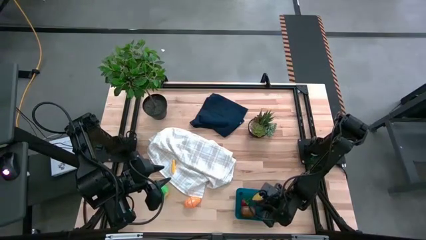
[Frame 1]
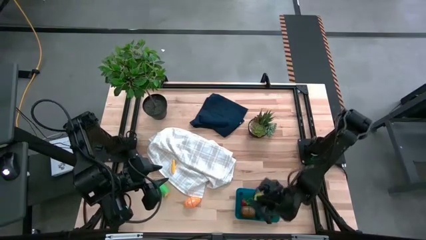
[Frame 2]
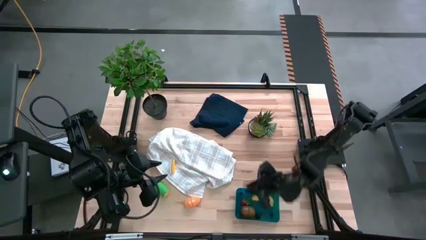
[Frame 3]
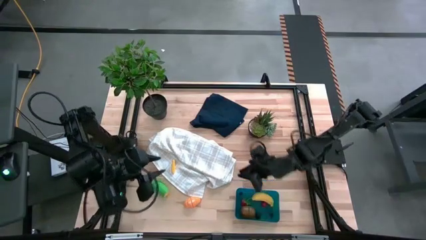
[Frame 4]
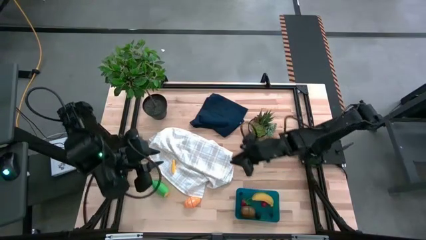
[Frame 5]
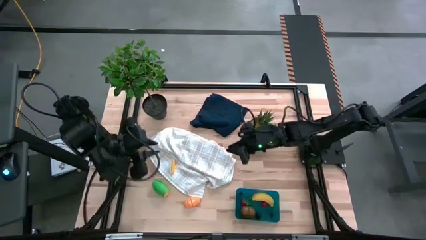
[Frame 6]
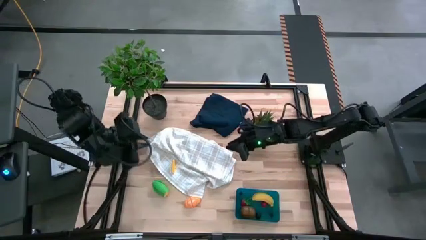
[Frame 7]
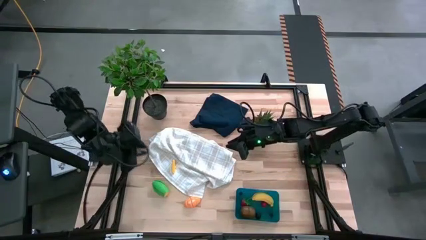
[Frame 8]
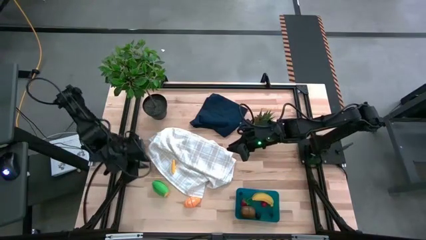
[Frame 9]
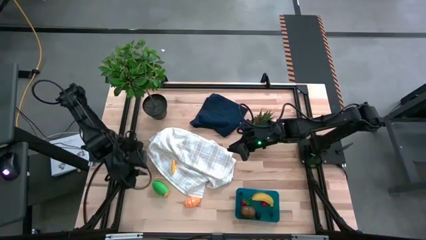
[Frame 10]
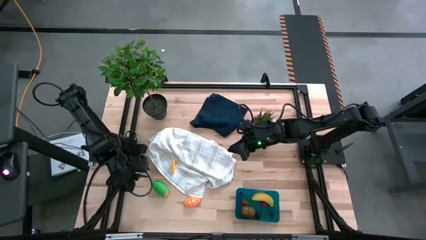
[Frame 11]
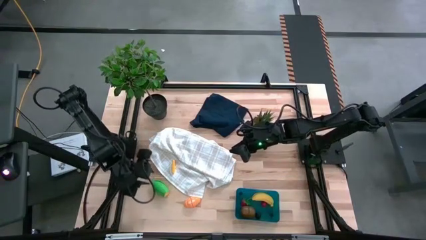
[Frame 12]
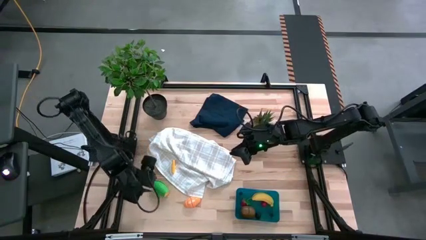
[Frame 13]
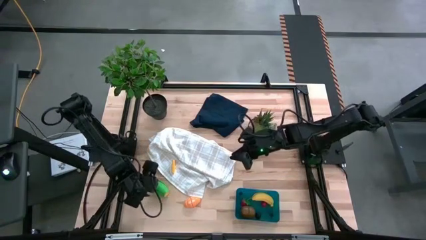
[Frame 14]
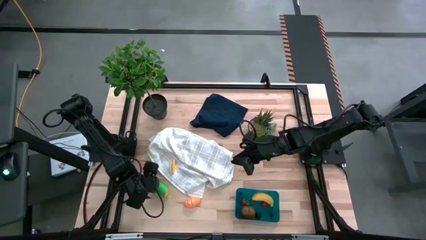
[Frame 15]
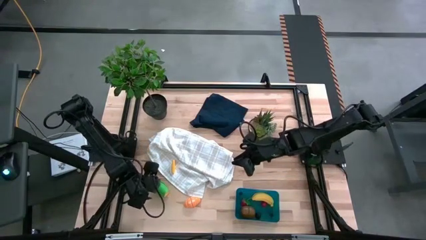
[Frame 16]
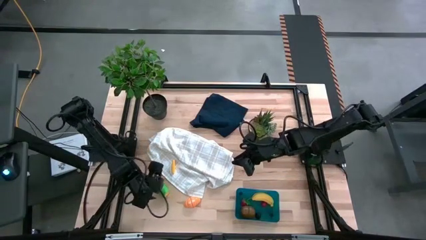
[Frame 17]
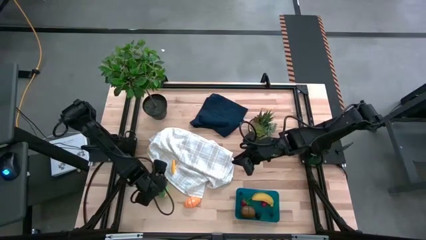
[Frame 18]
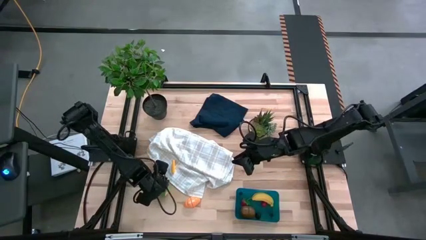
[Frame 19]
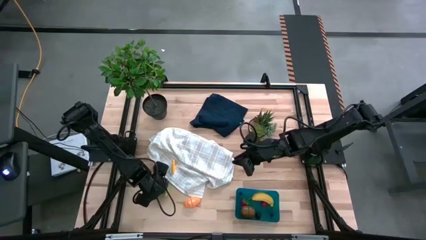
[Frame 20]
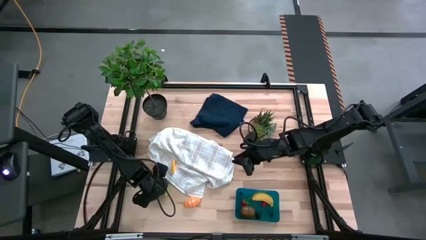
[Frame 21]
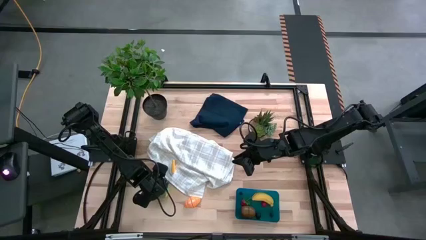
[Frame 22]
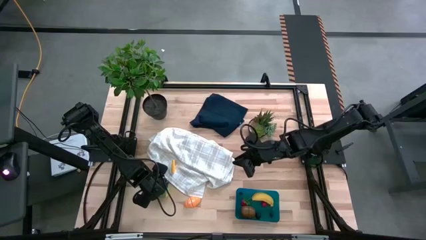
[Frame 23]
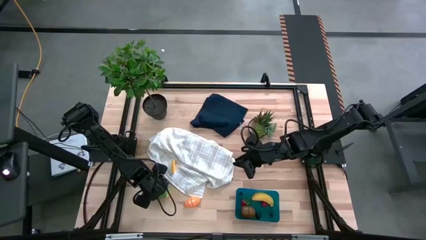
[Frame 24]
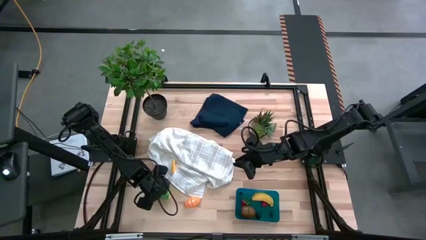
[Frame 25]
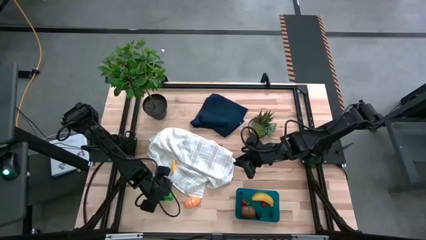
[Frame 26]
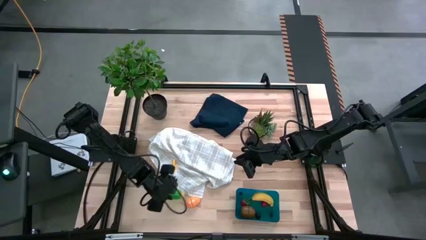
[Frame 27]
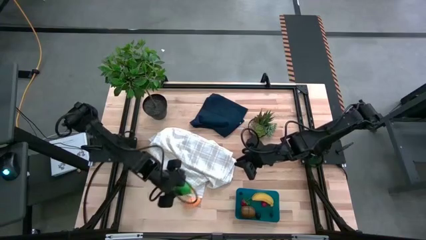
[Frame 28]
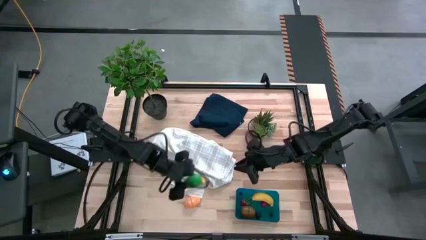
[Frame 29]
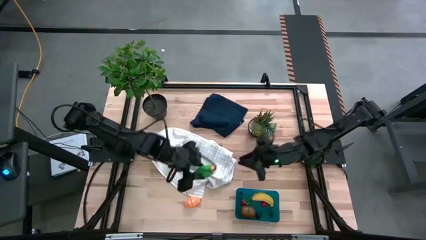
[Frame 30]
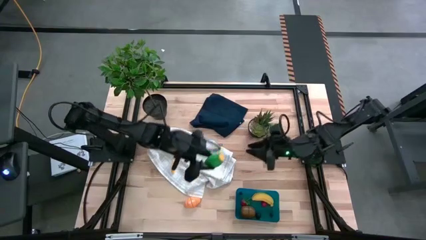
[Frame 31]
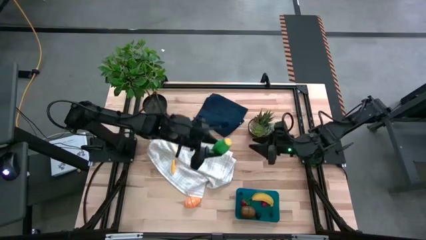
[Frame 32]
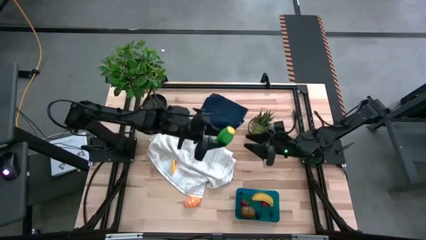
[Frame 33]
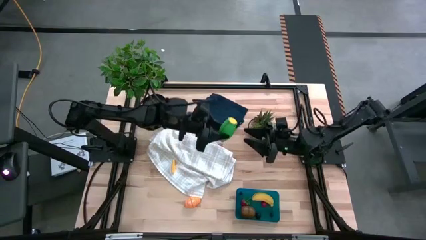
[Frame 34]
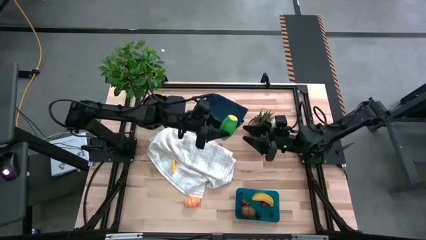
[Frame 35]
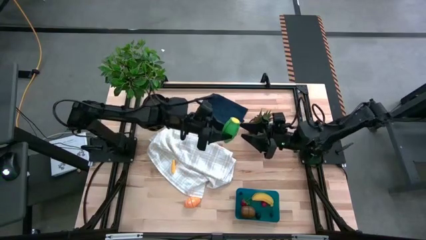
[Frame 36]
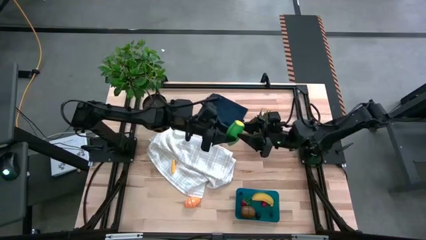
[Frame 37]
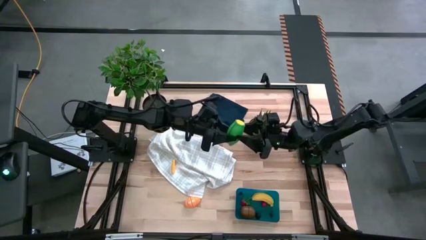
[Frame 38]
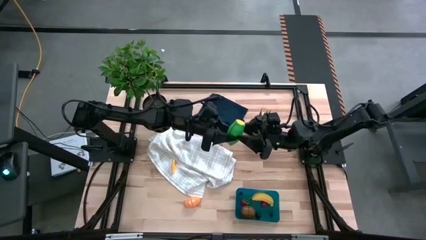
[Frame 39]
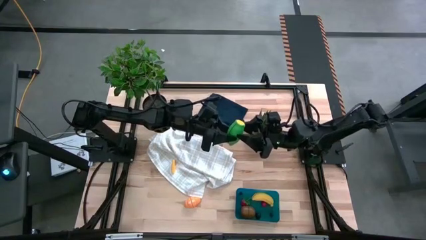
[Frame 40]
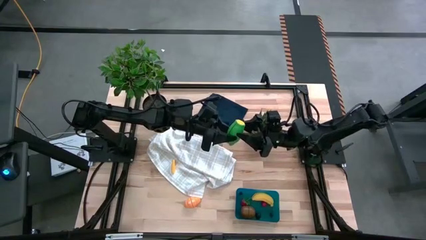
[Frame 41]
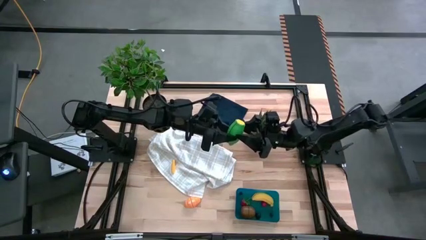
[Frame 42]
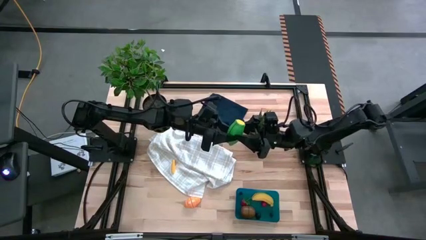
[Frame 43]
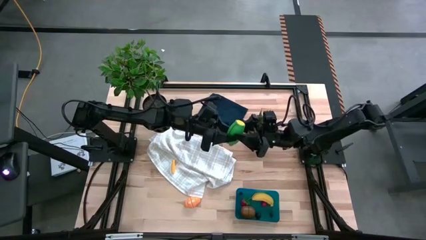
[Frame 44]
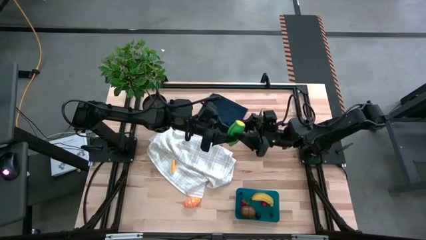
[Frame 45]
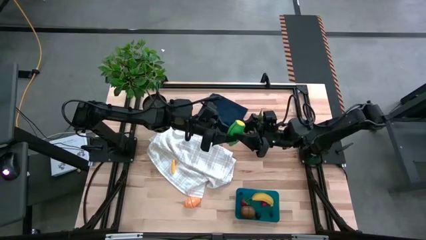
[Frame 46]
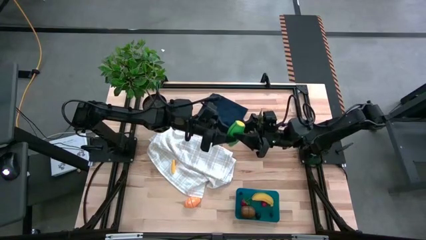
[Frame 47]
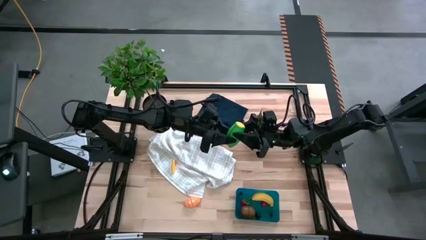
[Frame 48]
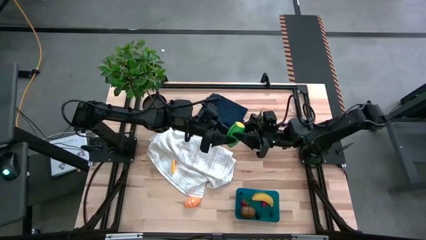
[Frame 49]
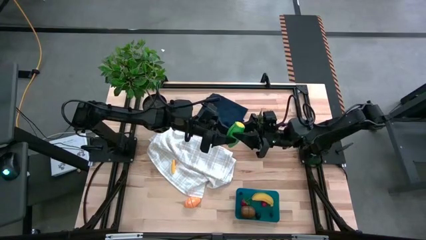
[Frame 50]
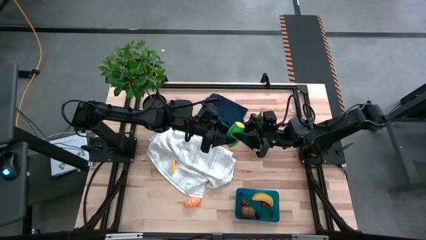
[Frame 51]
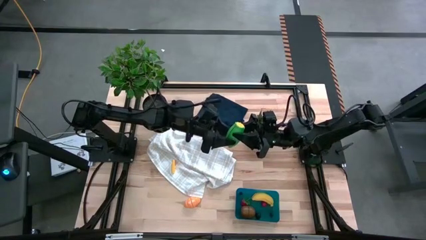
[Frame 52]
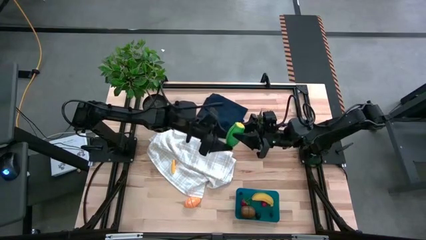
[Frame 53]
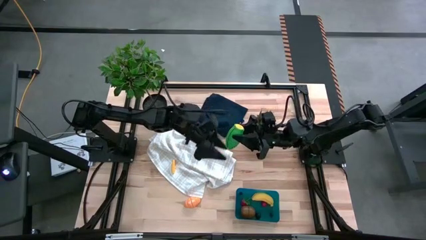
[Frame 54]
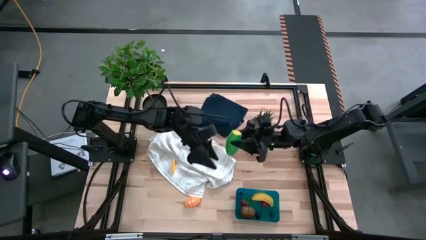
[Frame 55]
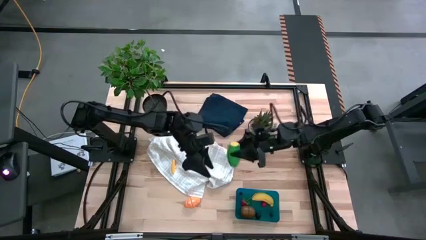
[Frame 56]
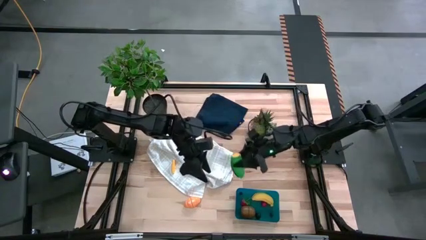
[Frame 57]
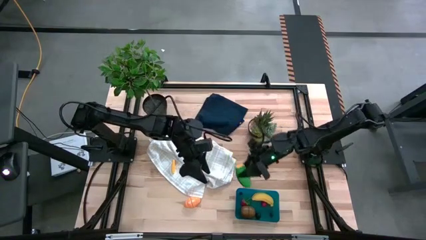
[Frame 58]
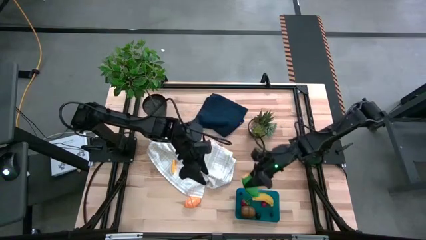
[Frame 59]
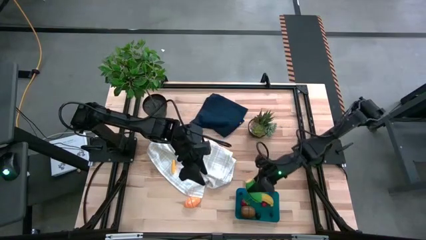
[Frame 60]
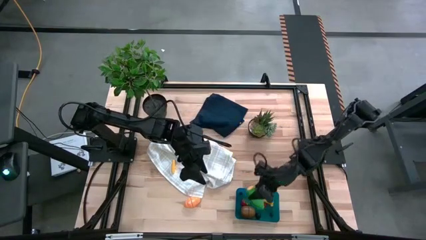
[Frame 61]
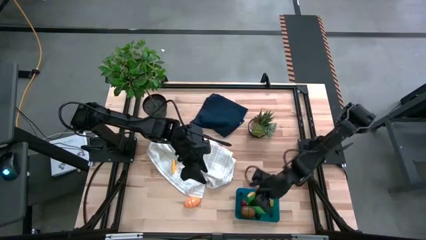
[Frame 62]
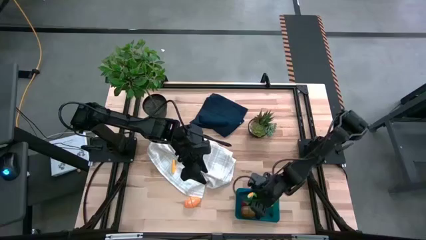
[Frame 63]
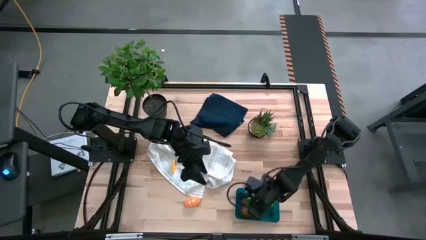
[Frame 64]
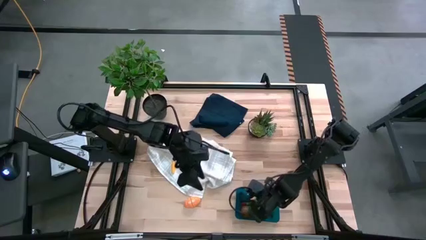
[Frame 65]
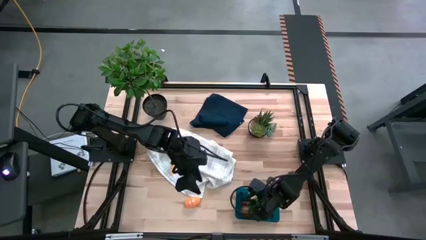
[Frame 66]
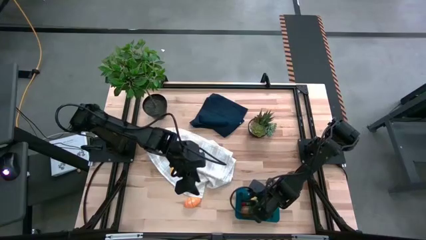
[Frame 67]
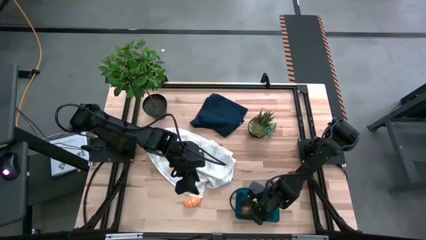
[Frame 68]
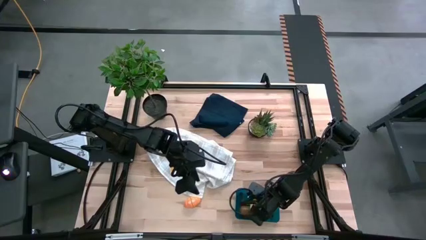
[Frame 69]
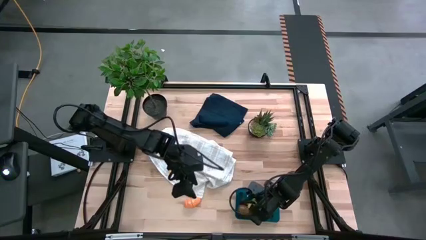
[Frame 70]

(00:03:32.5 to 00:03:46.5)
Task: Pick and placing Produce into tupperware
Put the green corn into the bin

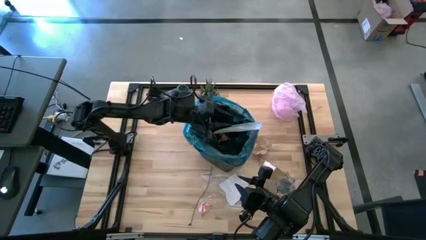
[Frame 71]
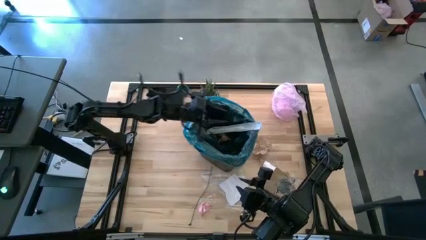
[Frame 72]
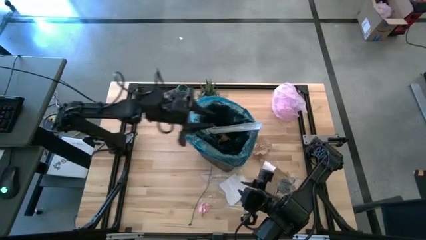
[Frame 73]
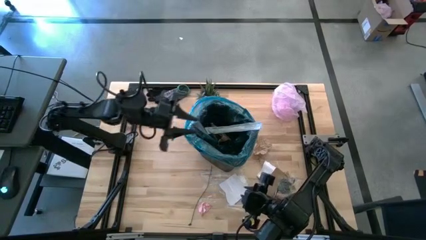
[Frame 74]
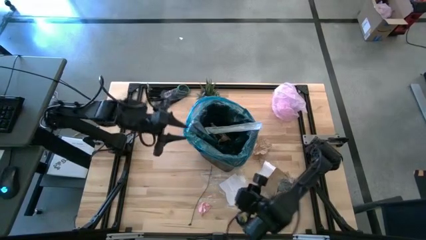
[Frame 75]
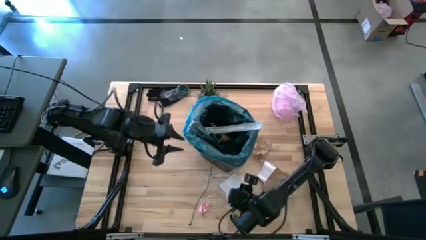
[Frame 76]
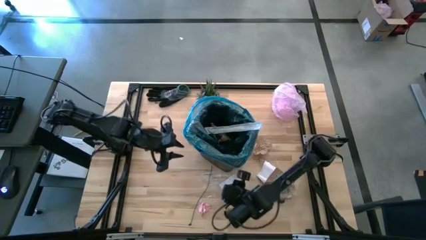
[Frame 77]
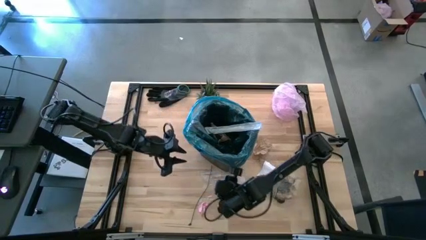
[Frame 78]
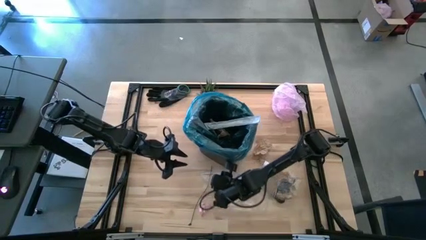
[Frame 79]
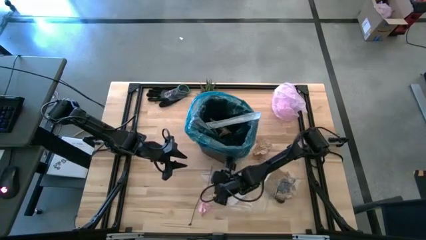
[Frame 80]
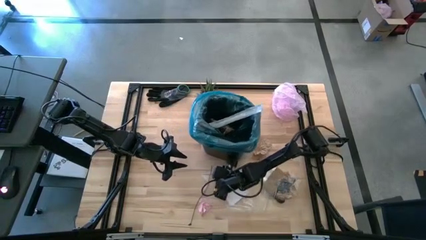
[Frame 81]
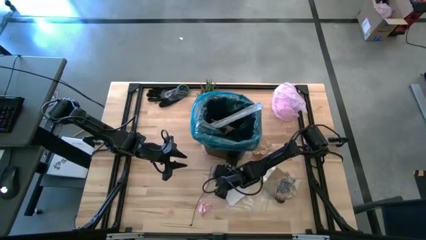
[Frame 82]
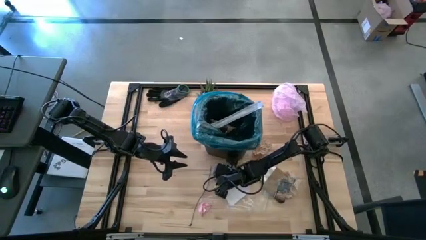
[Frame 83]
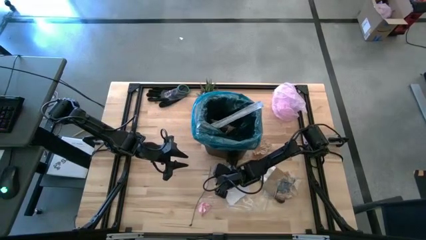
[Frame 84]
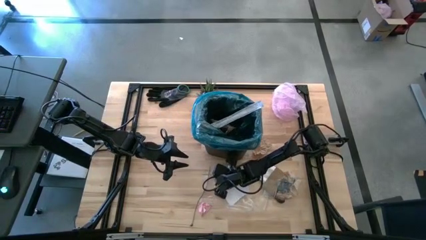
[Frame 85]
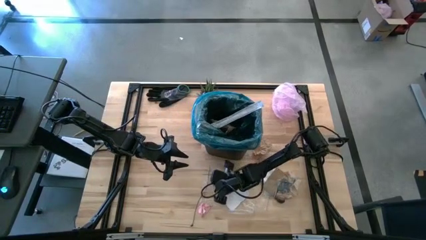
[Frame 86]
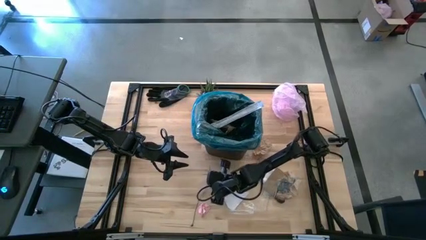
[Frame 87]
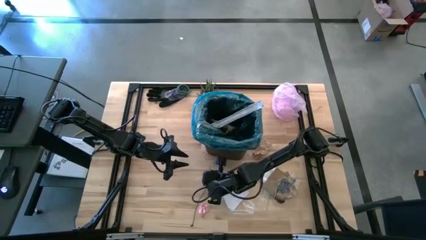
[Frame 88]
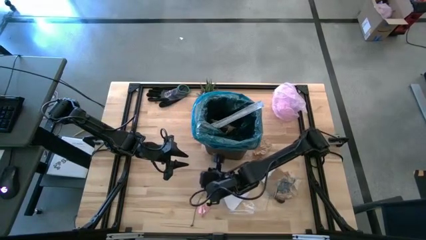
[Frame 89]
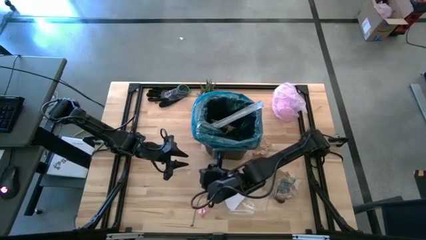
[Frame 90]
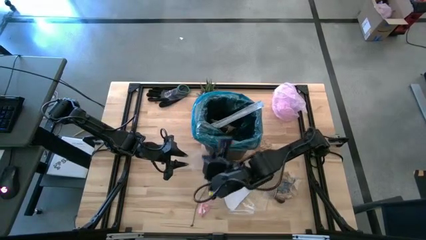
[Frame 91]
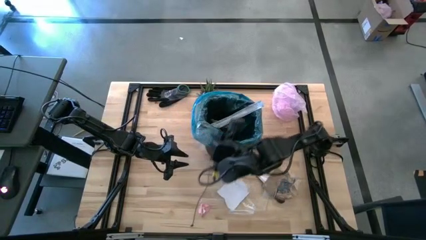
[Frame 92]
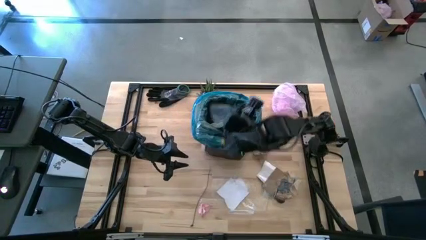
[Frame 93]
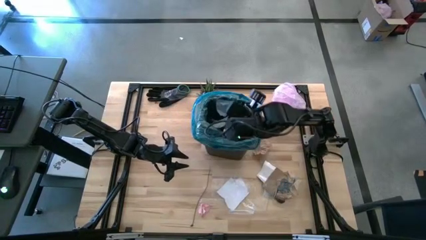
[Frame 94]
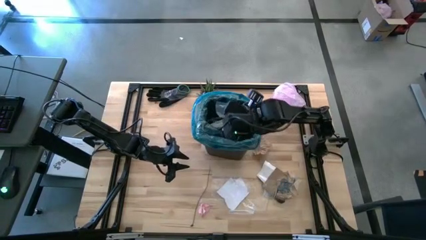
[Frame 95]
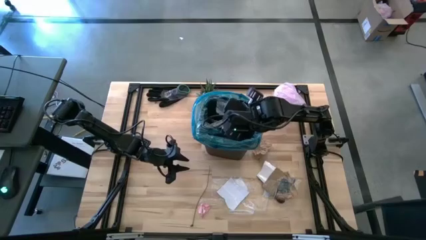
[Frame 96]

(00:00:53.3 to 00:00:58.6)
Task: place trash/remove bag and relplace
Put the transparent plastic into the trash bin
